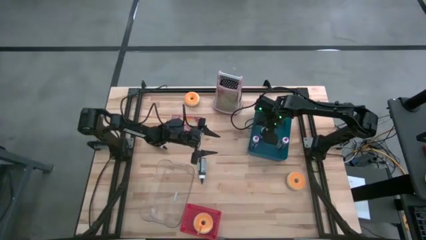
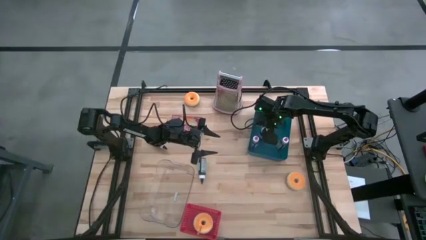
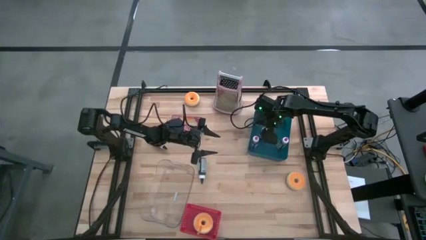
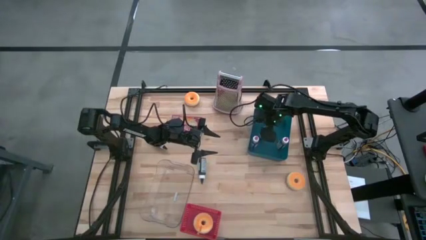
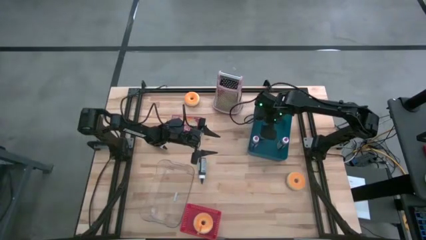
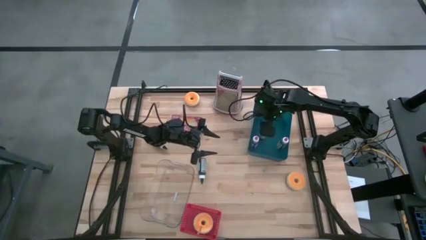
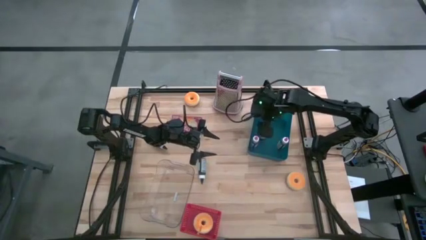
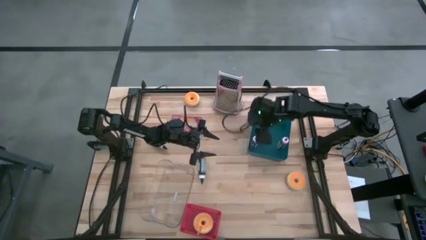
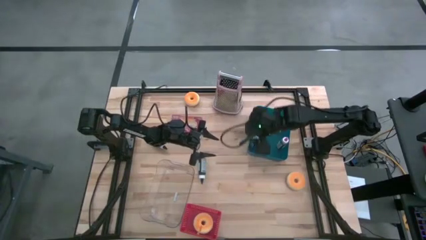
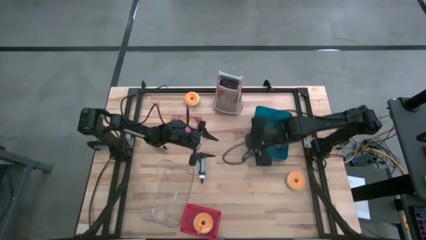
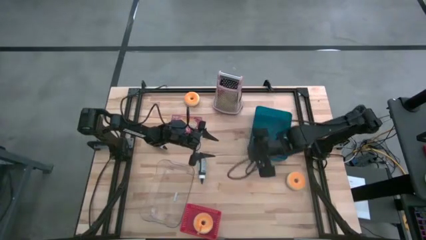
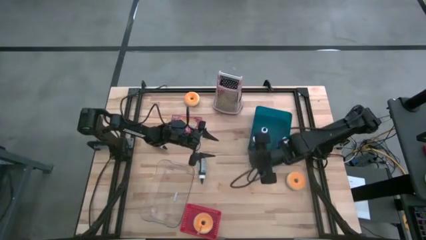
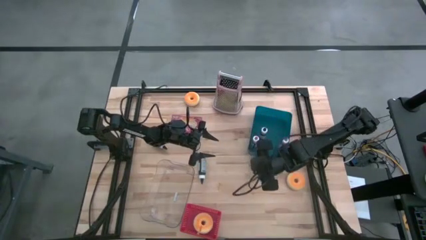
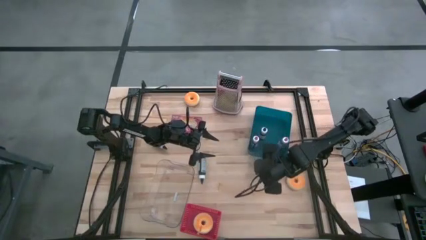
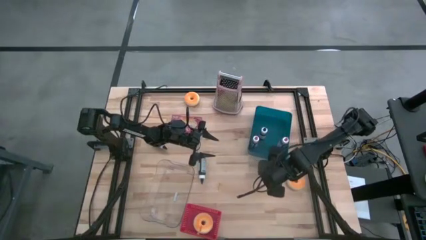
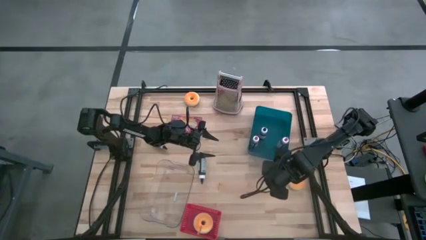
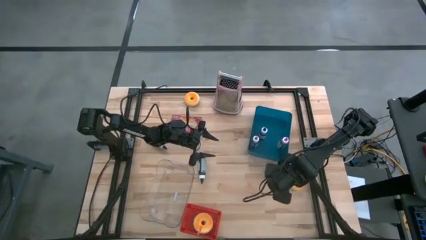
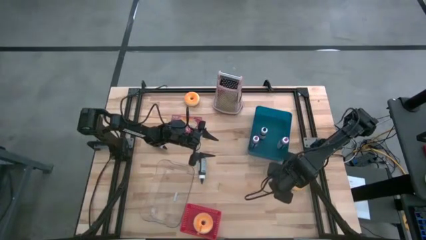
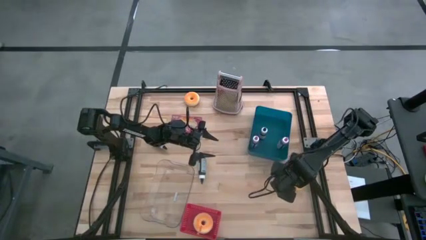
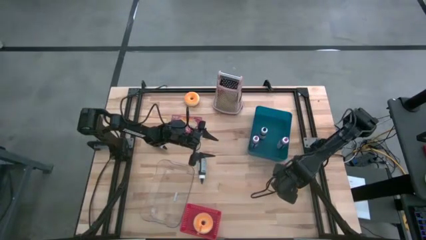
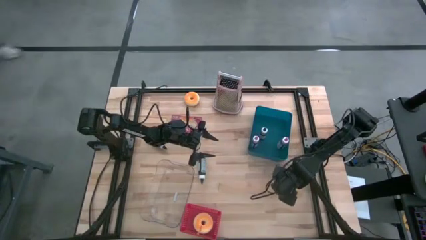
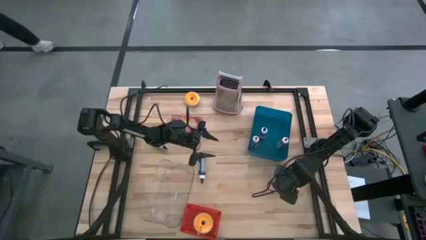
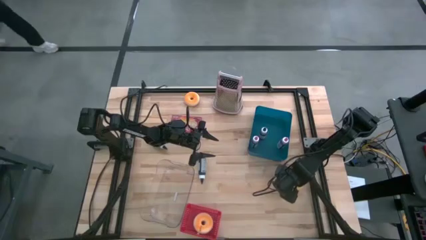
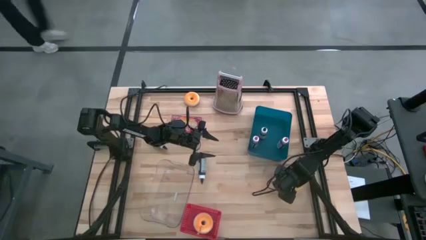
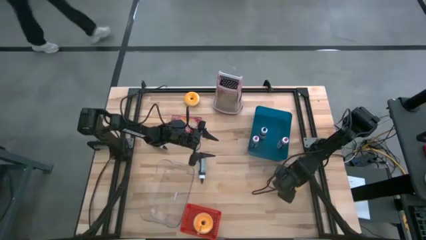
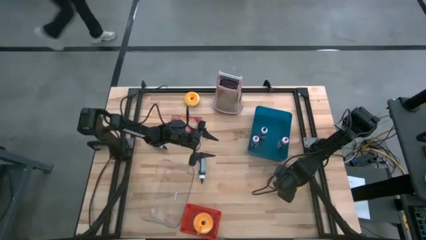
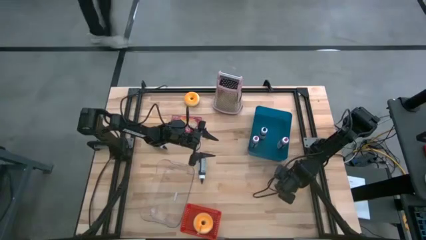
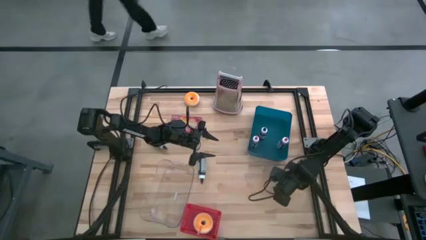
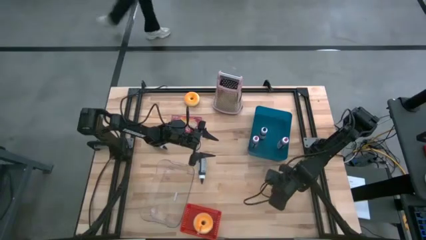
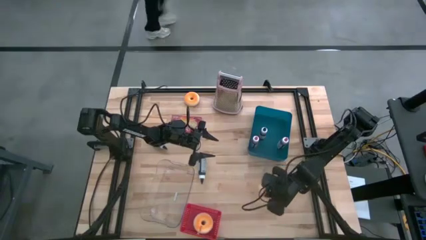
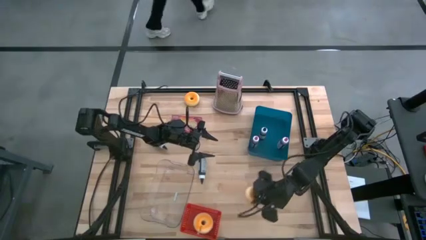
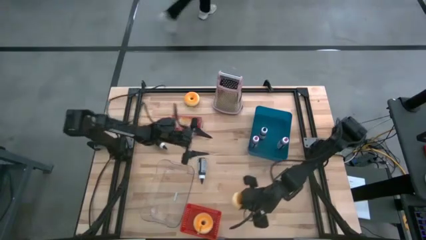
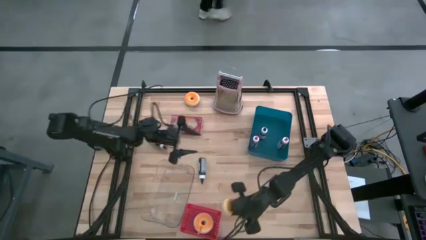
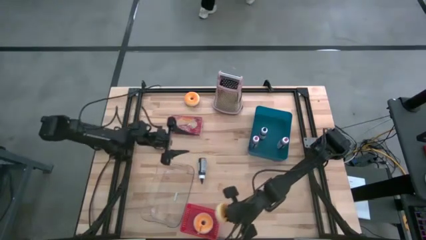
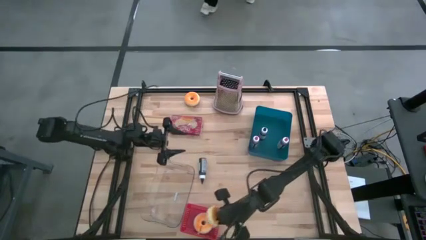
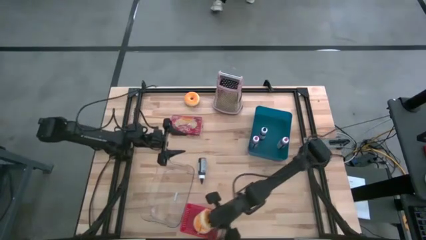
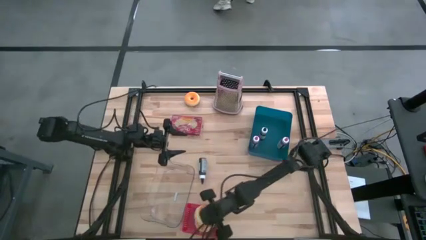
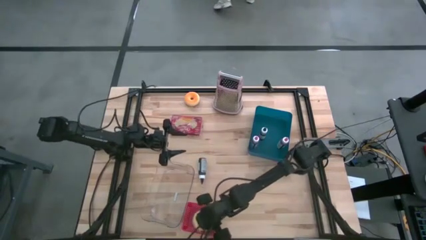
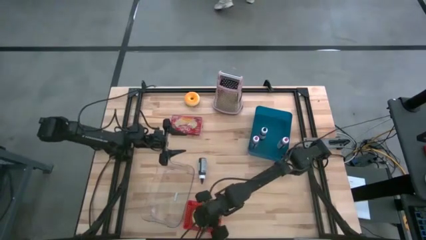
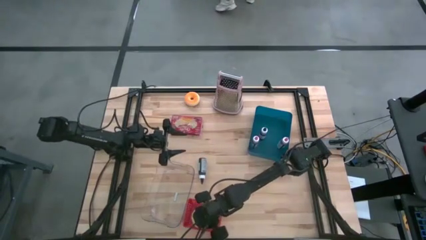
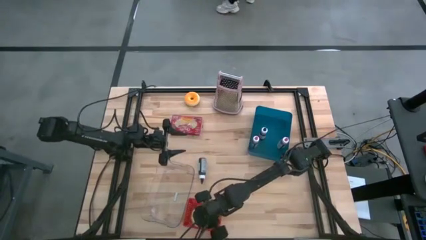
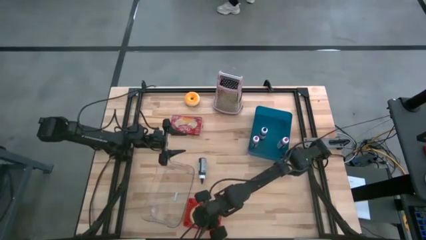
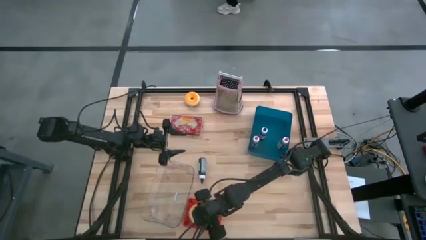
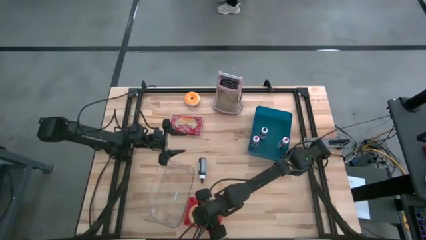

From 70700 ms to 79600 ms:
Task: Pick & Place Food Item
Put the bottom orange donut into the red bin

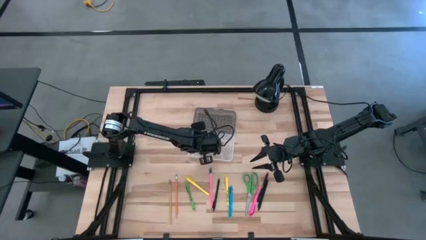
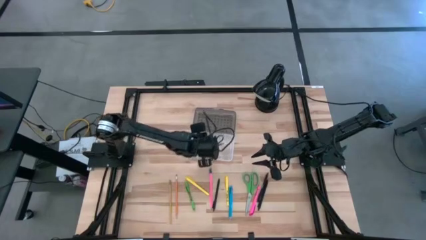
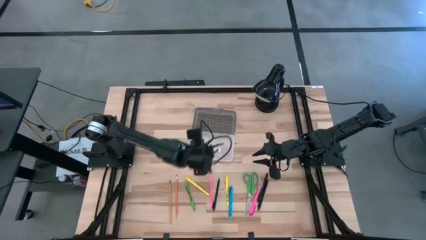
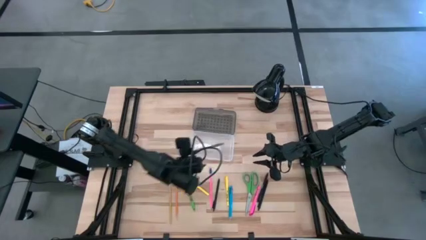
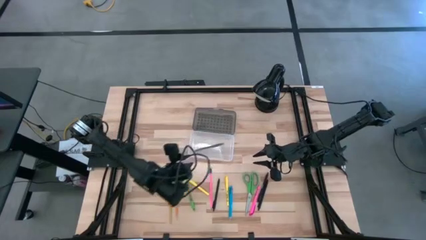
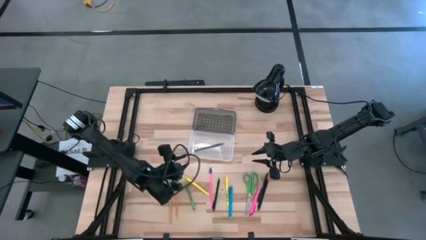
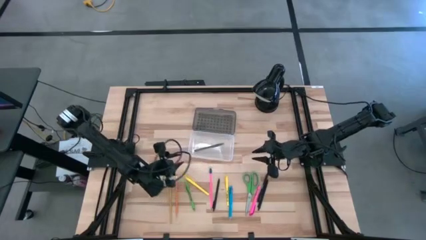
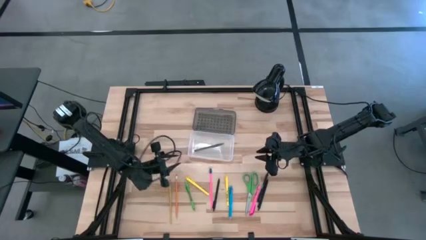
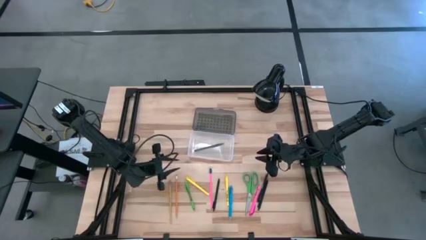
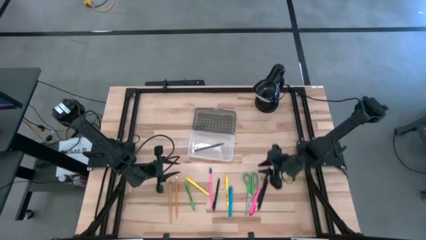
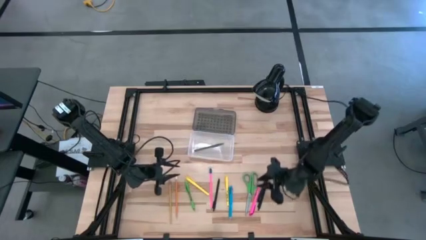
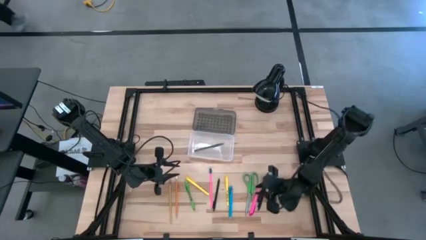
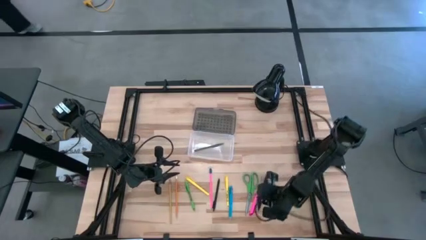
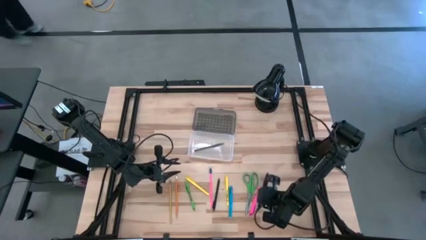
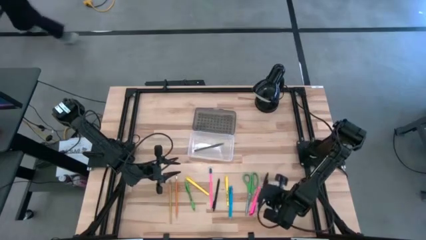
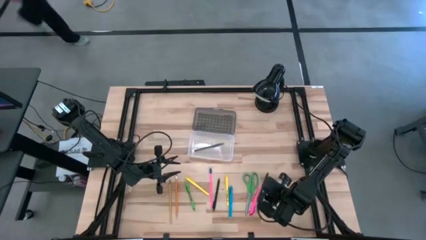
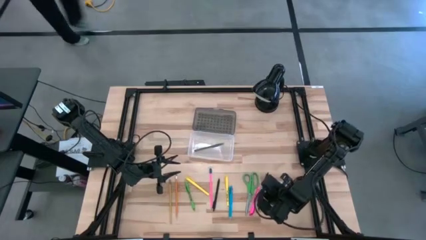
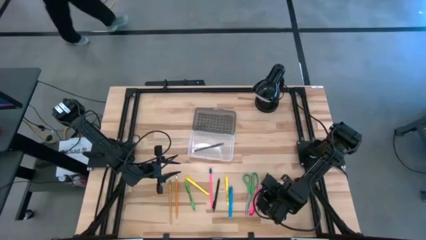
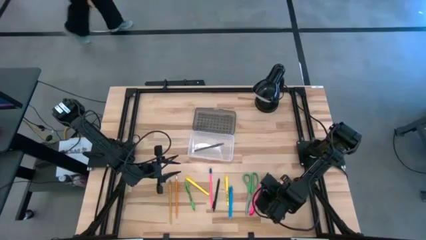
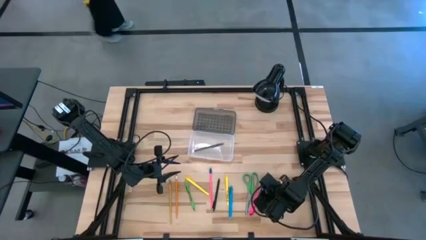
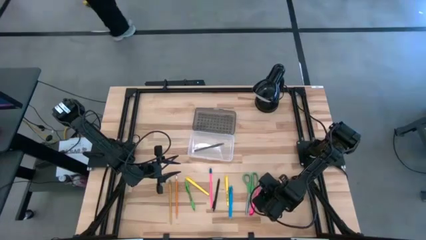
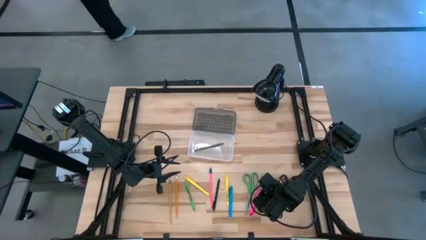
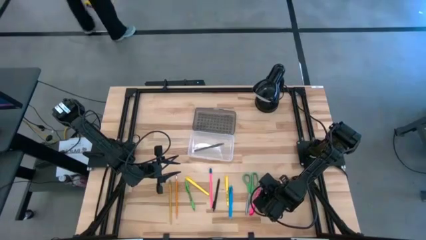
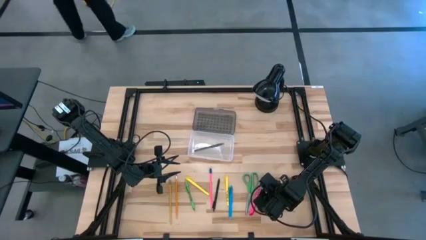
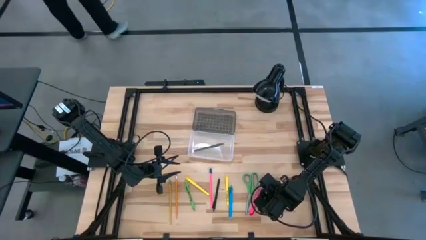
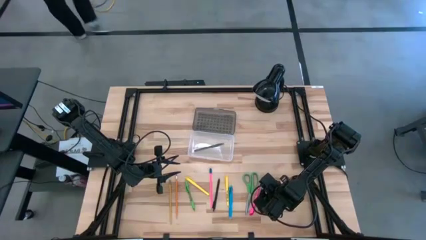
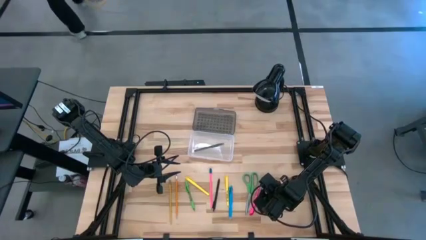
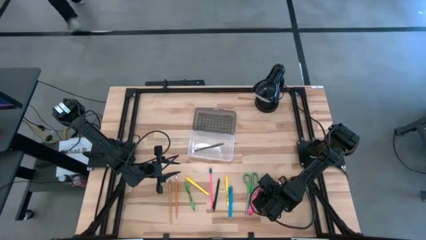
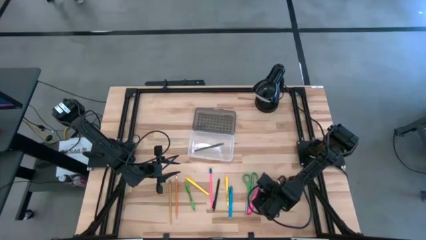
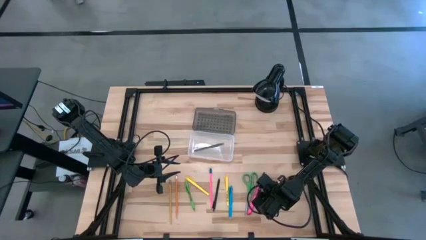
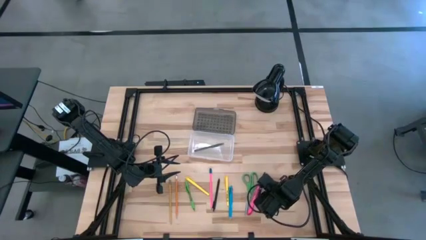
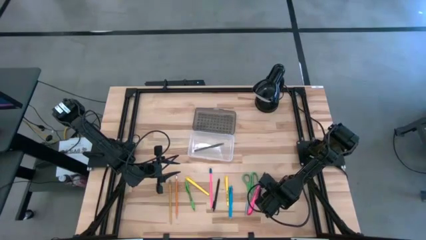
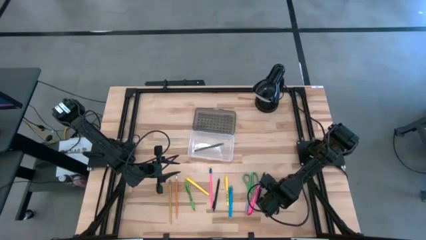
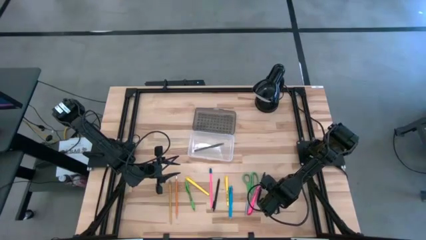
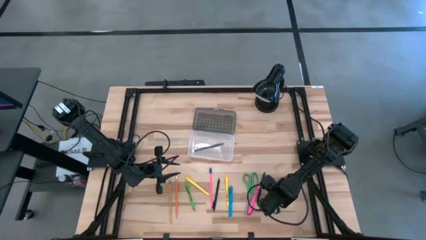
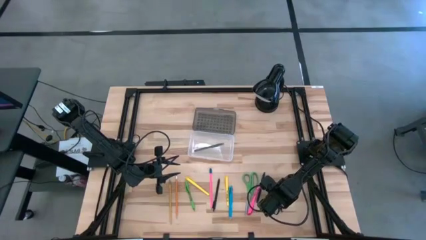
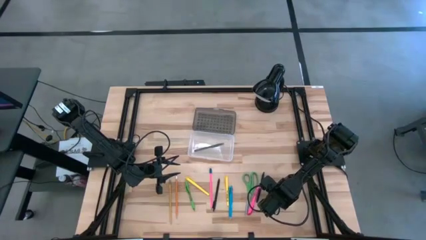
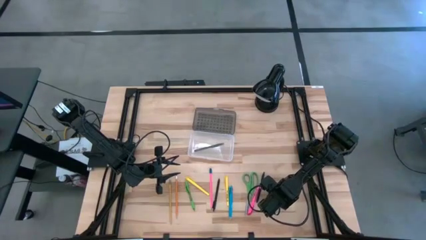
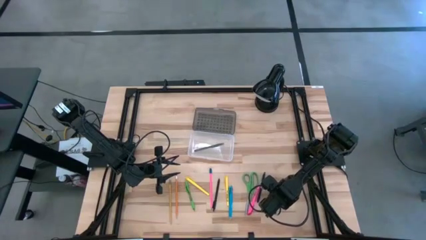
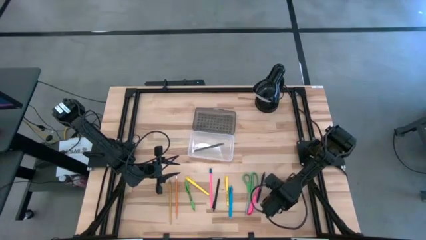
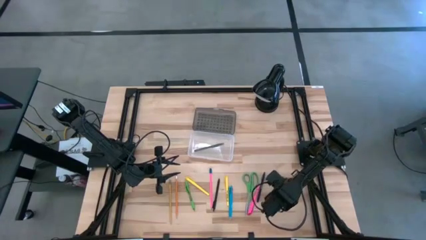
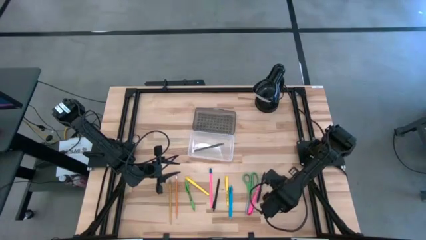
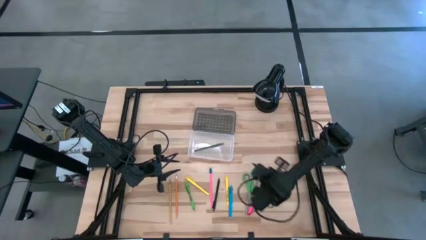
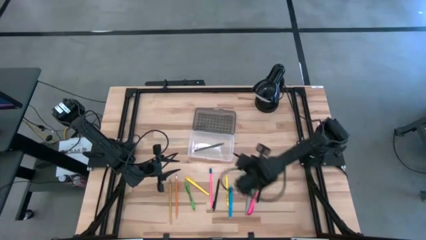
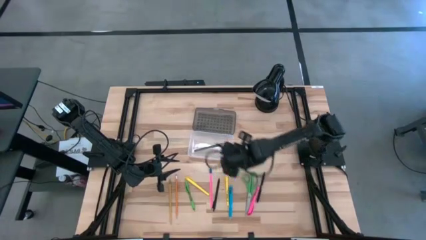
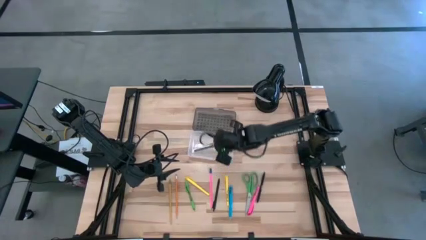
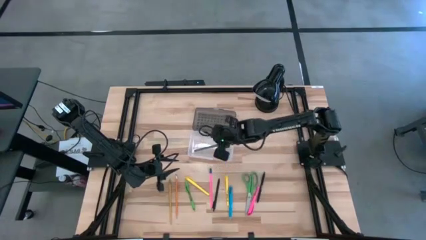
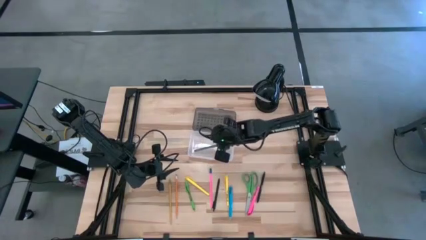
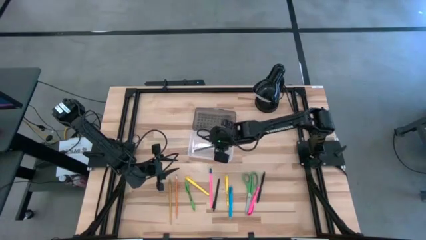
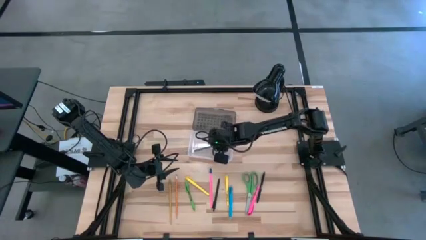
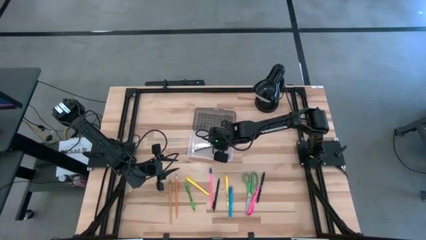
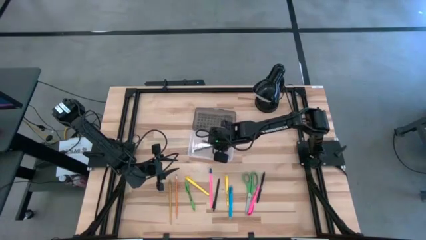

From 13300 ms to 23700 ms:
Task: Pick & place school supplies into a supply box
Put the right black pen into the transparent supply box
